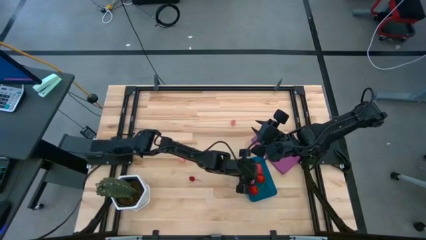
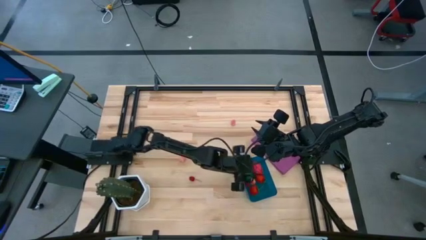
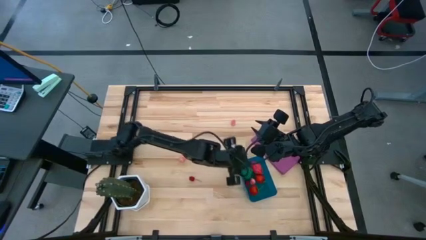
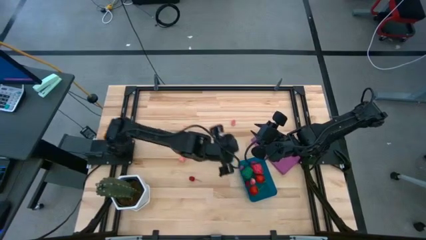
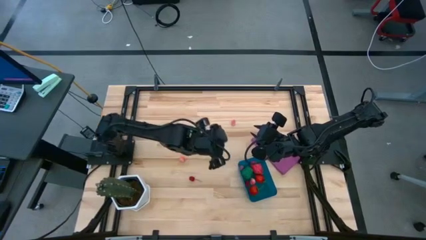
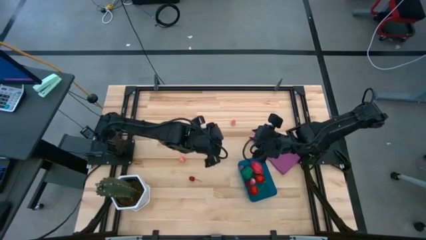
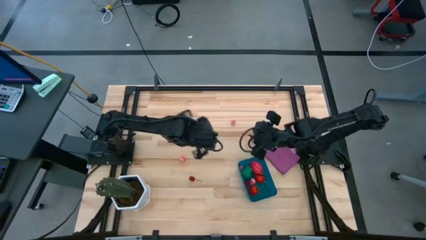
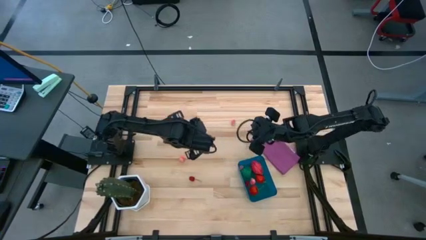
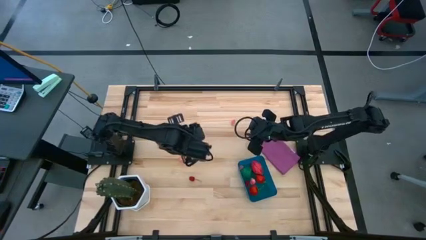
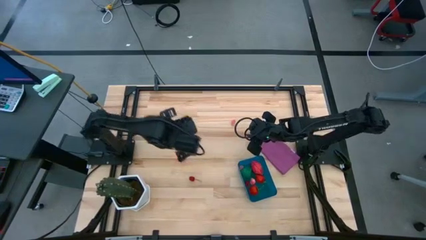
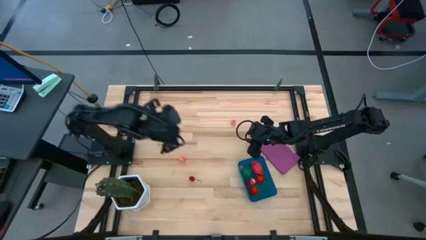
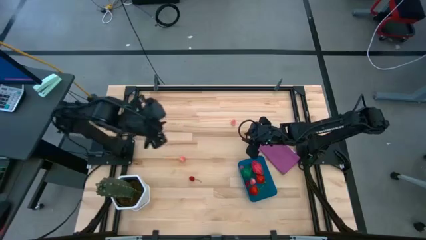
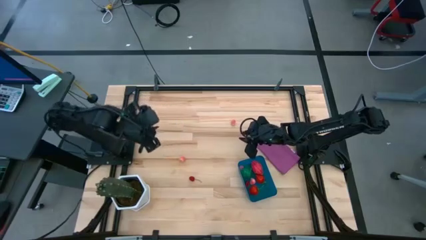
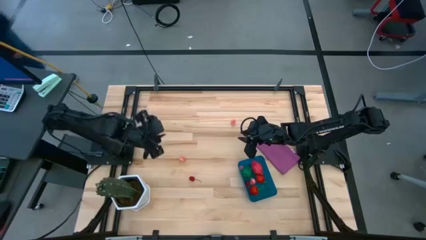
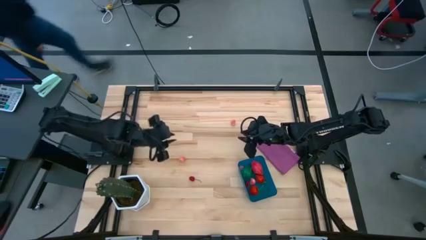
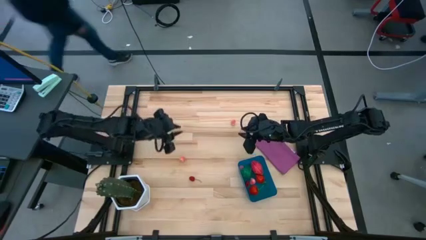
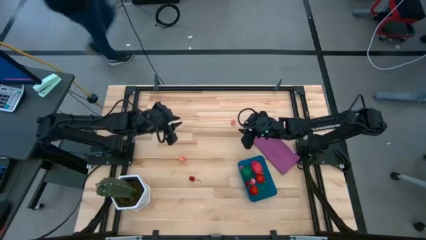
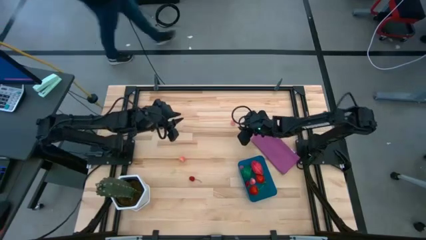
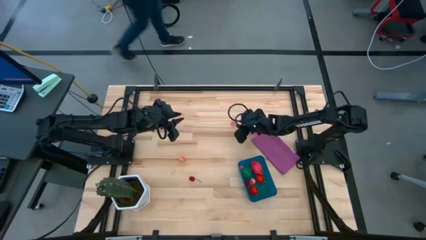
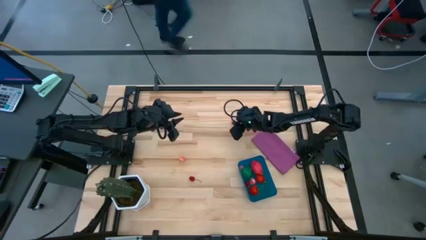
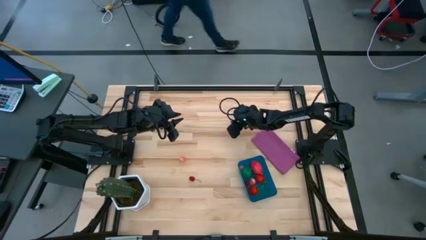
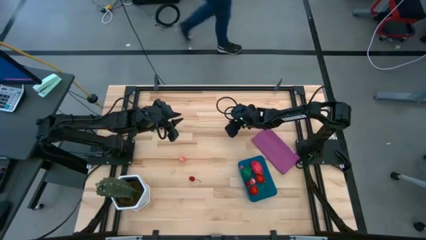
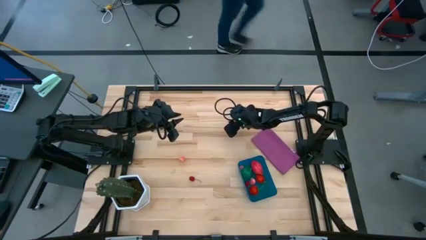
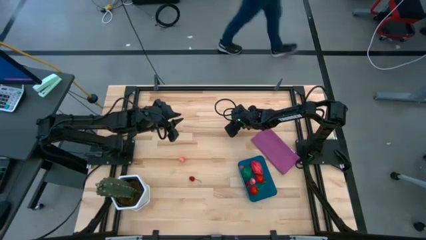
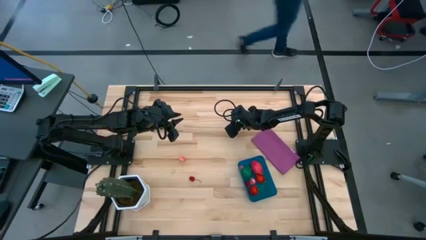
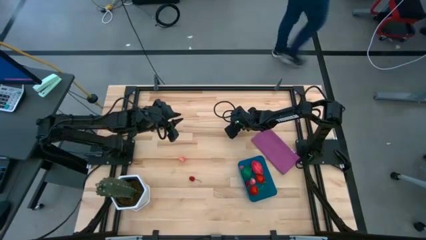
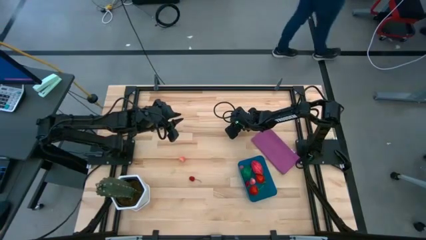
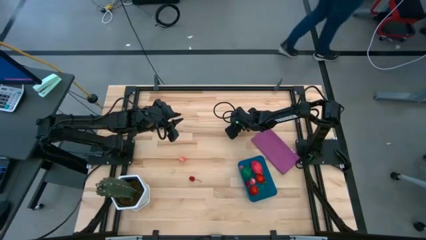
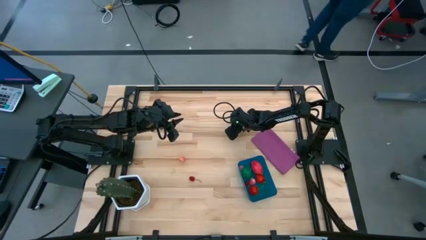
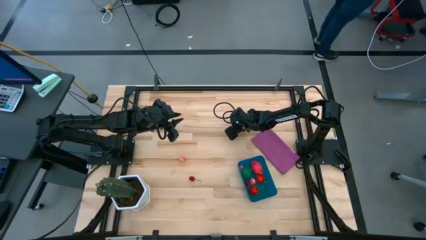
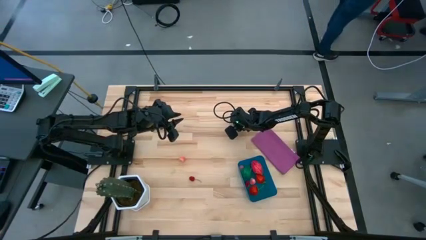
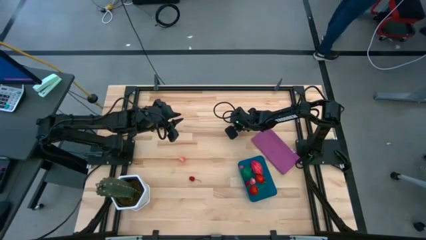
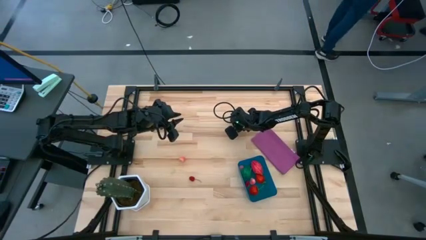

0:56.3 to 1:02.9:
Task: Pick and placing Produce into tupperware
Put the peach into the blue bin

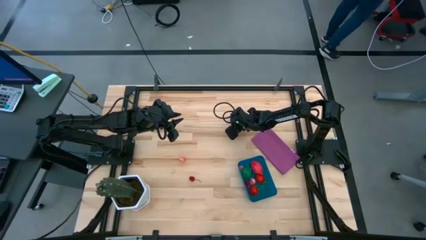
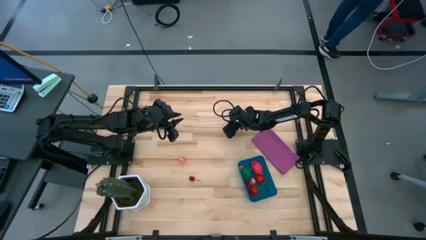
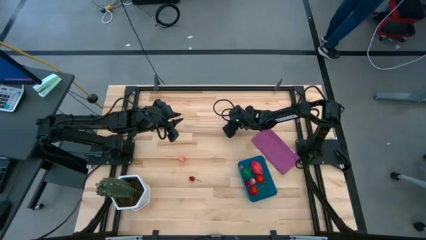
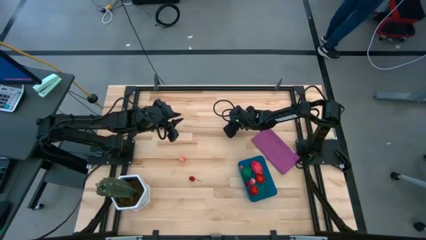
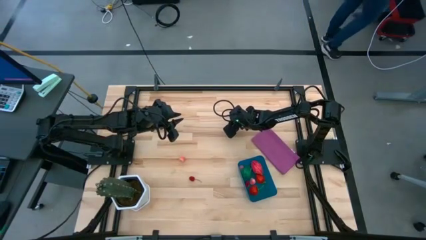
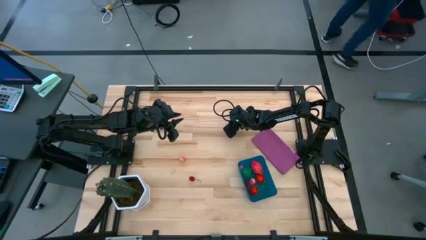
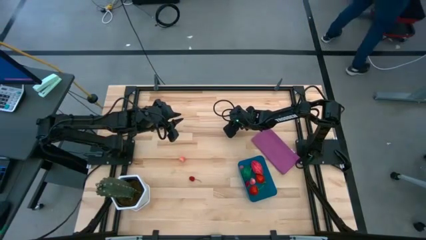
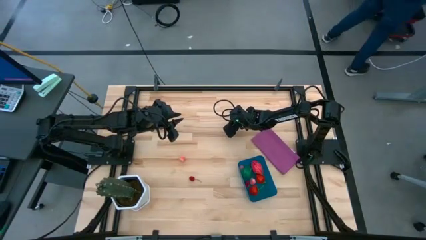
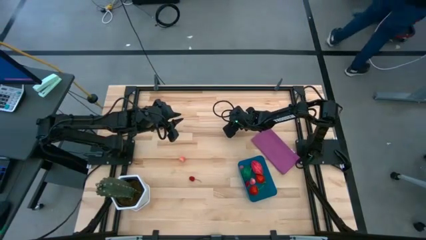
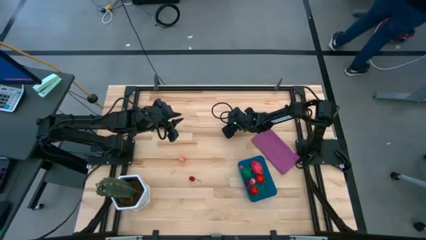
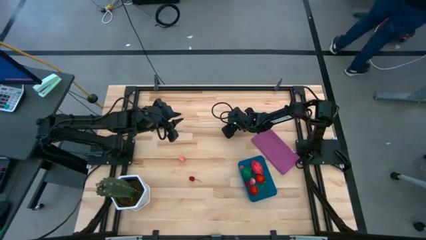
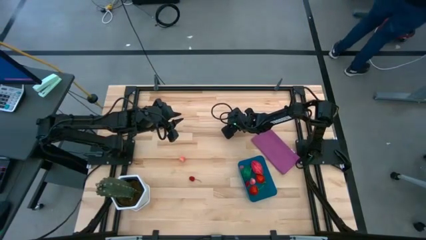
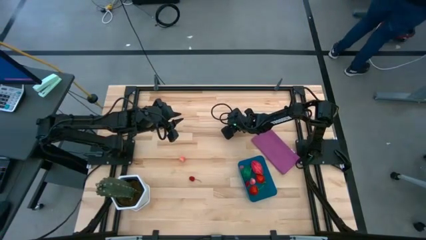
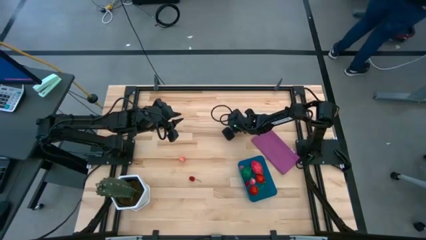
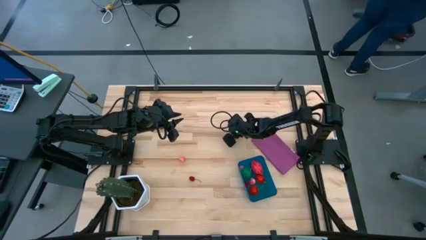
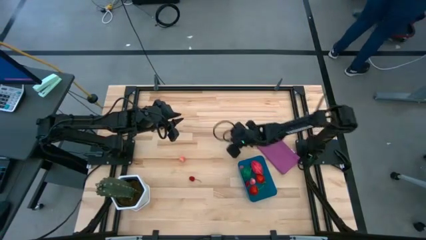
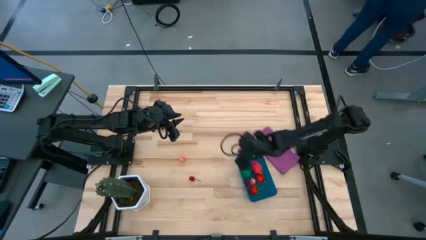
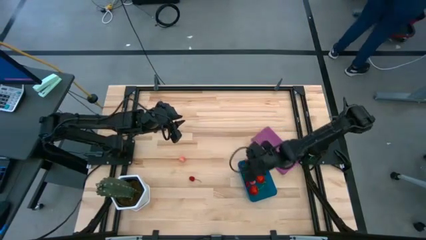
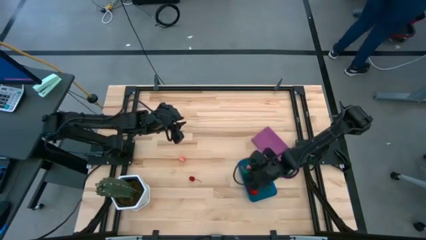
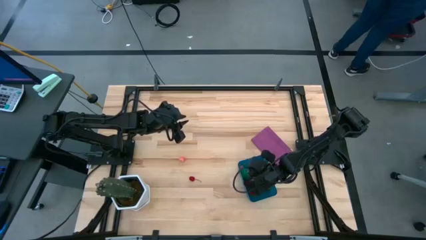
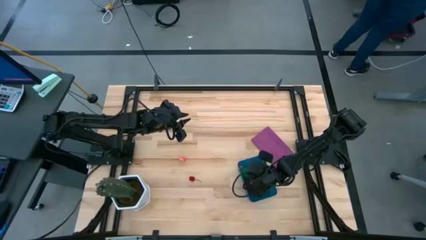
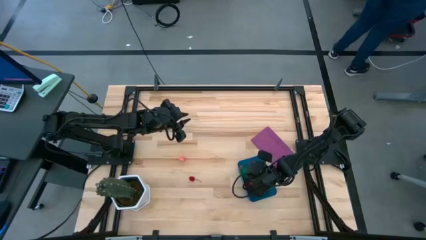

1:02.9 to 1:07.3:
Put the peach into the blue bin

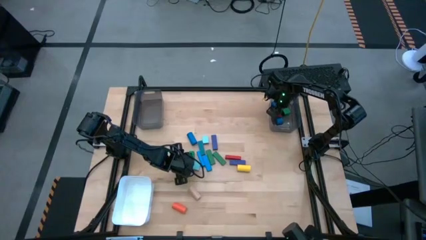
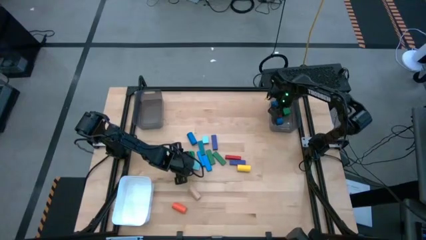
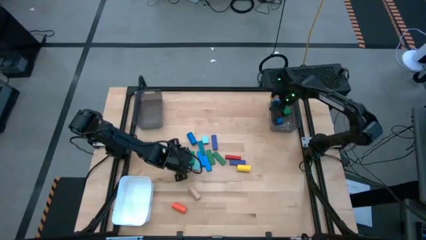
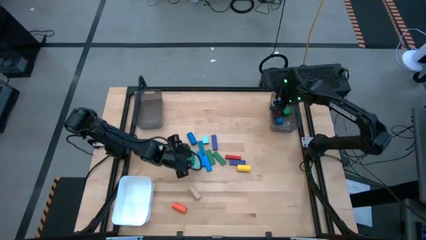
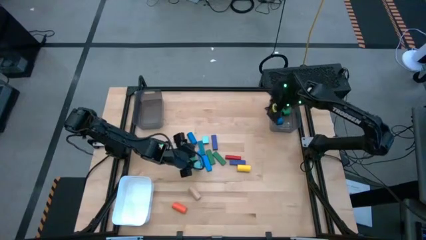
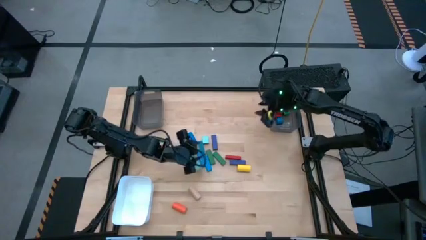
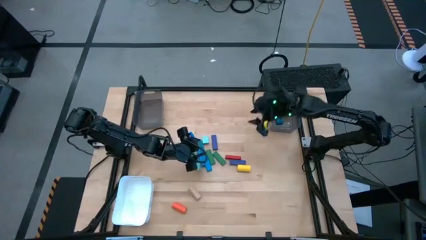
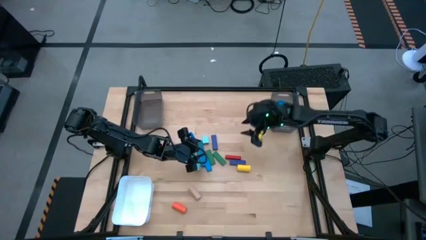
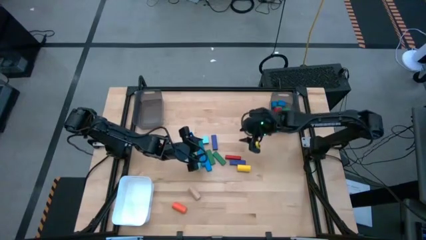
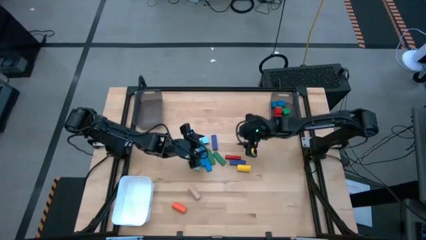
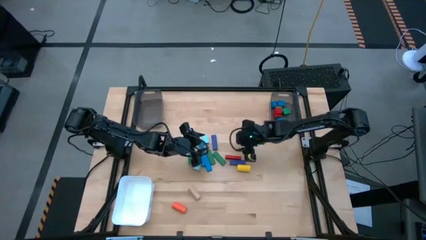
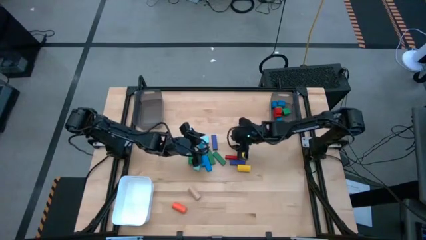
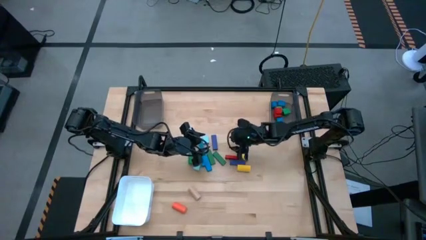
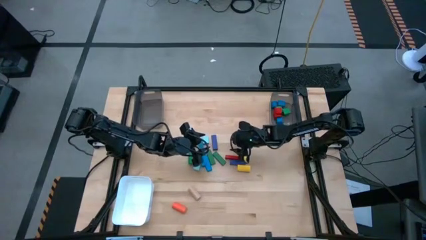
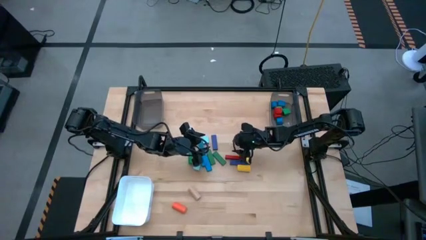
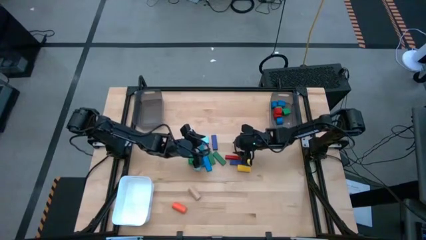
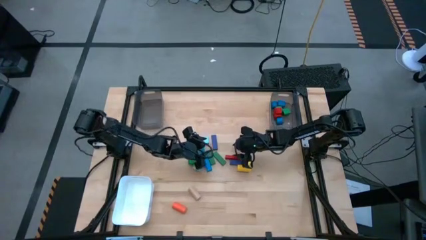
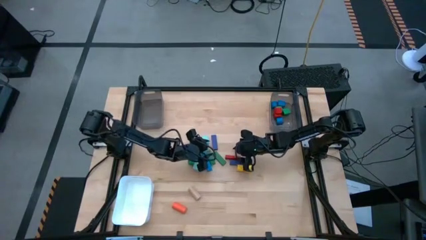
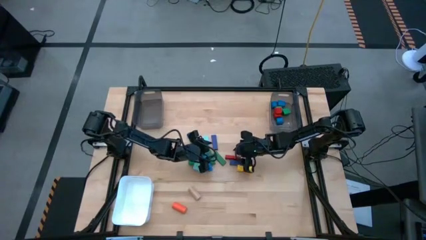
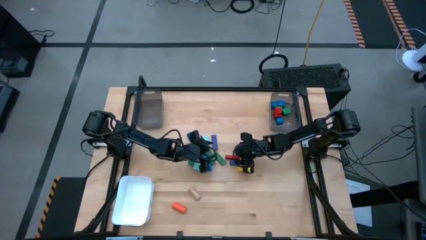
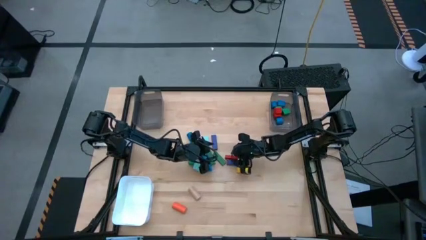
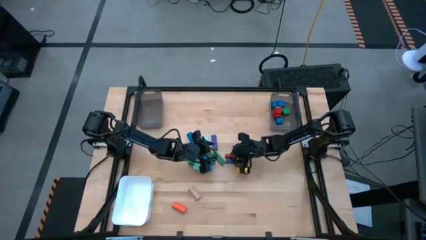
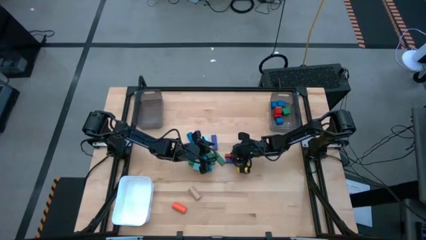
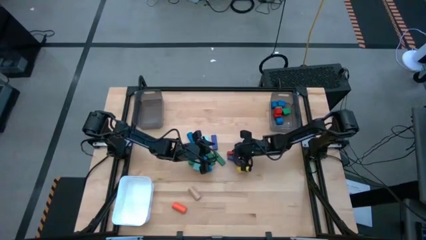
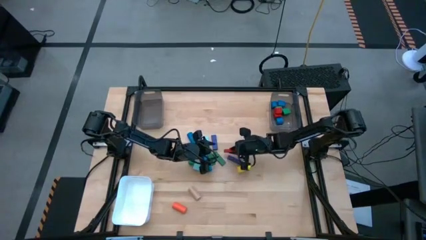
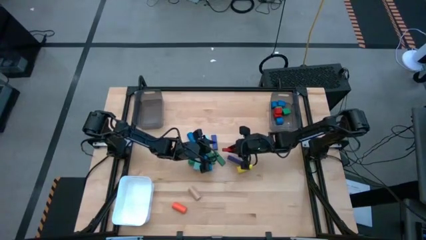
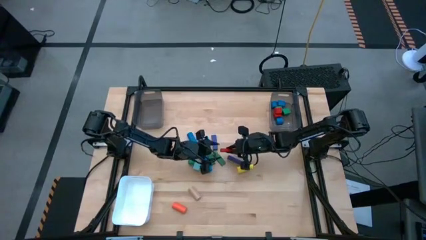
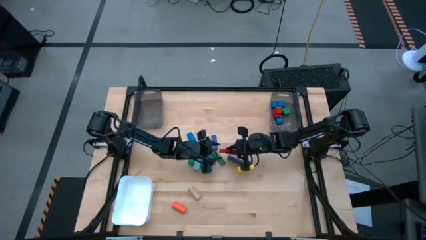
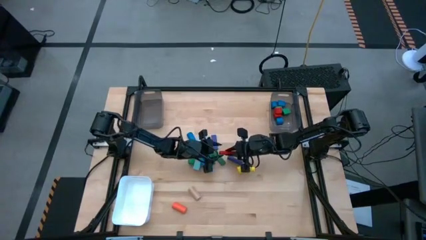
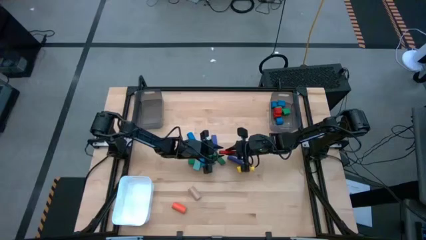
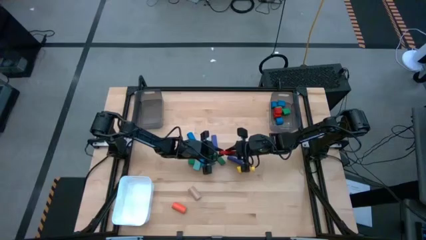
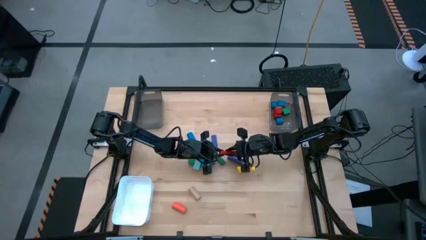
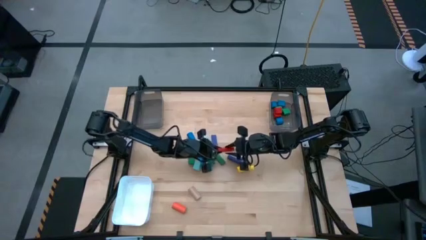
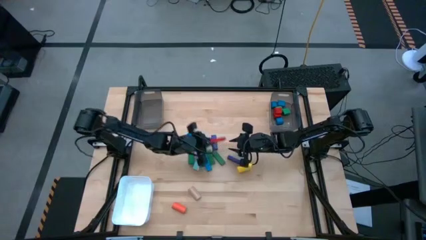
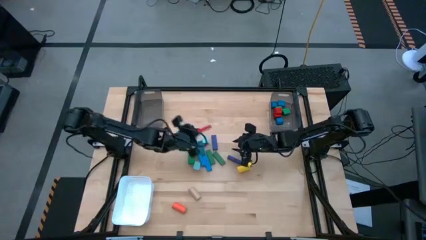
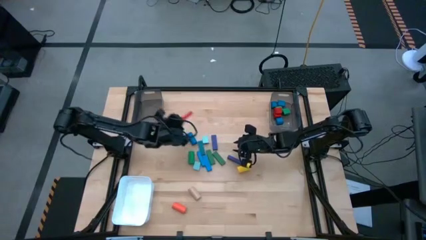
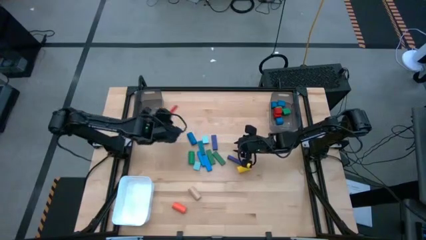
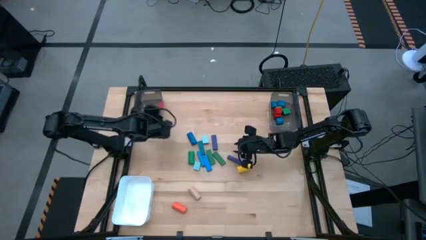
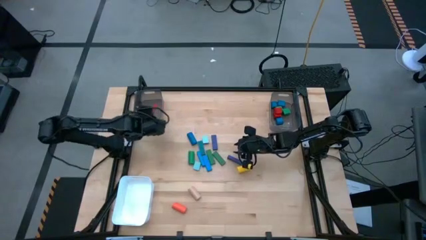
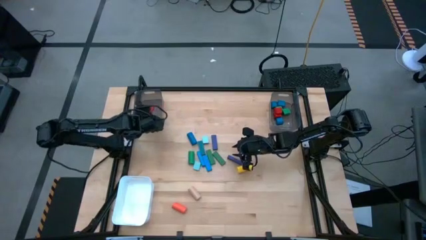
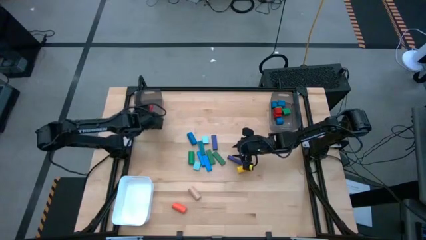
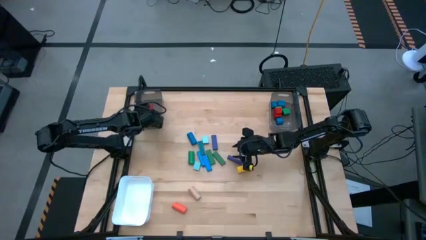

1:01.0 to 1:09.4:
Task: Sort blocks by size
Put the red rectangular block into the left black bin
